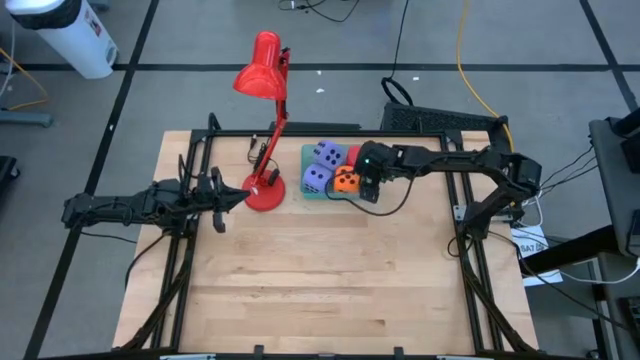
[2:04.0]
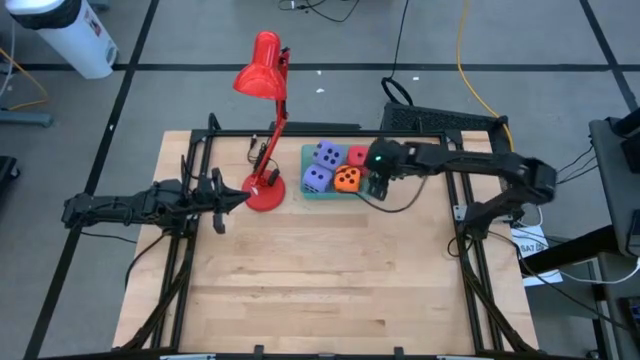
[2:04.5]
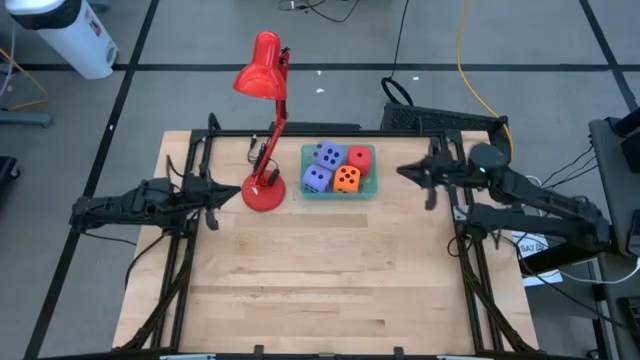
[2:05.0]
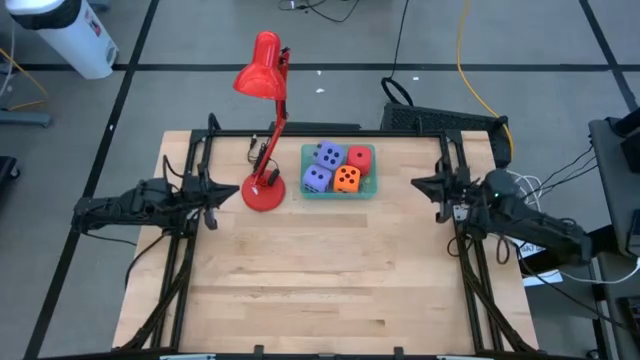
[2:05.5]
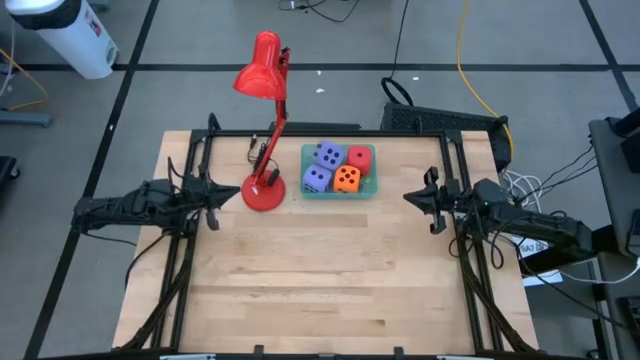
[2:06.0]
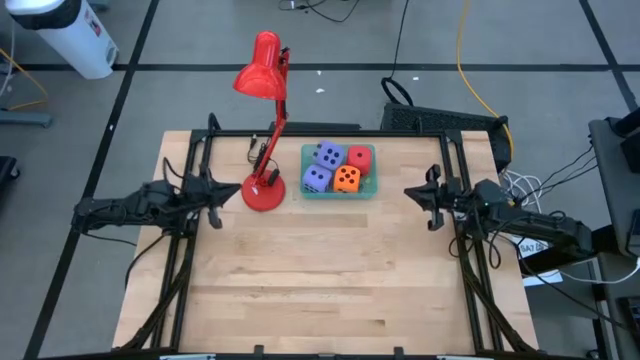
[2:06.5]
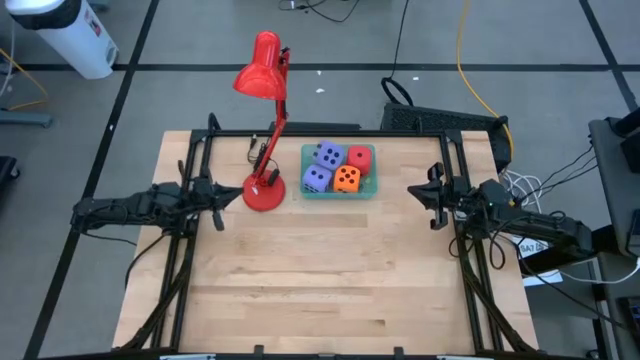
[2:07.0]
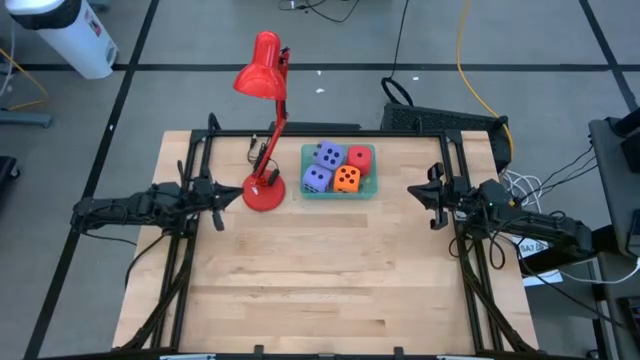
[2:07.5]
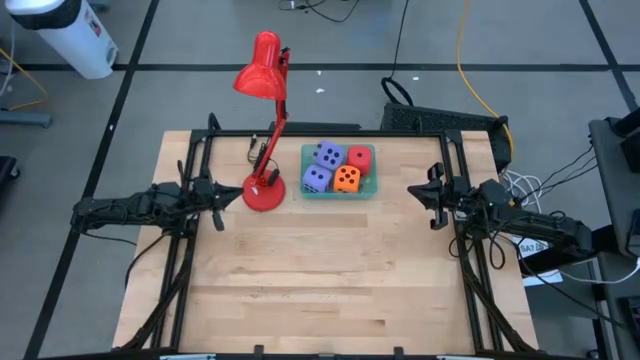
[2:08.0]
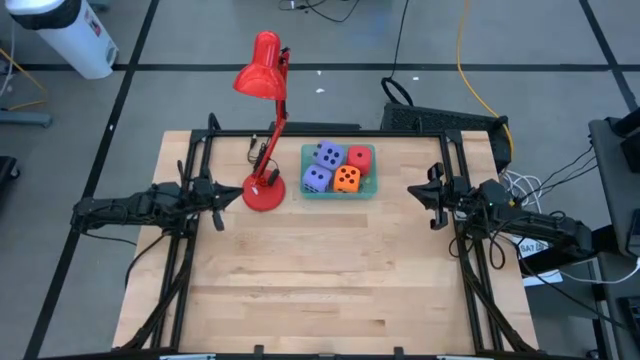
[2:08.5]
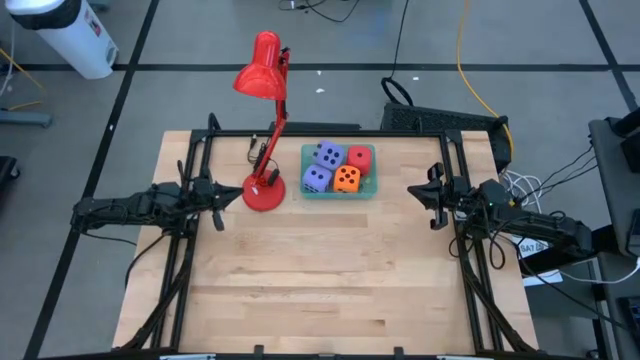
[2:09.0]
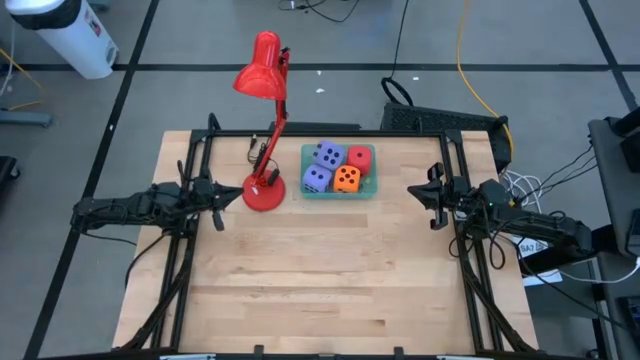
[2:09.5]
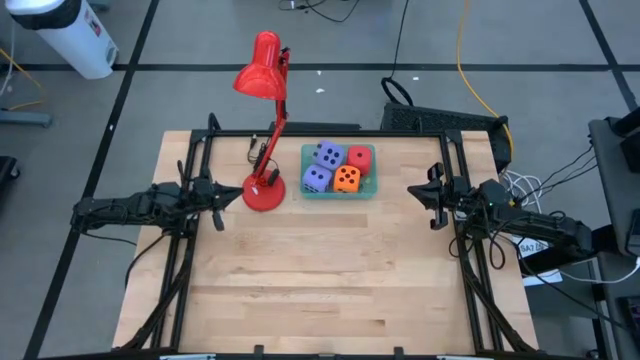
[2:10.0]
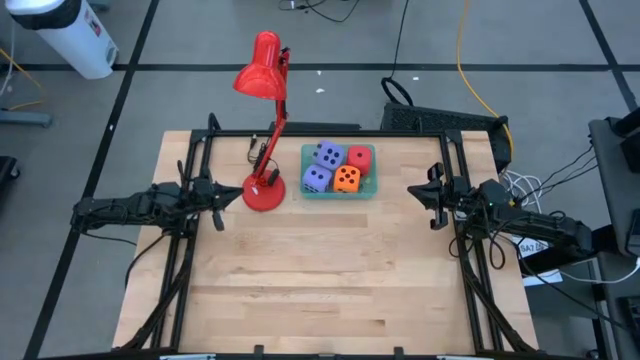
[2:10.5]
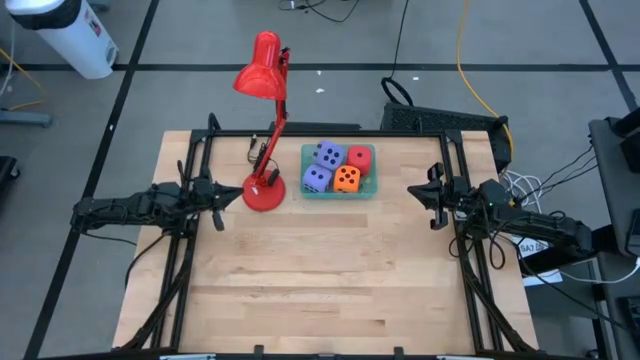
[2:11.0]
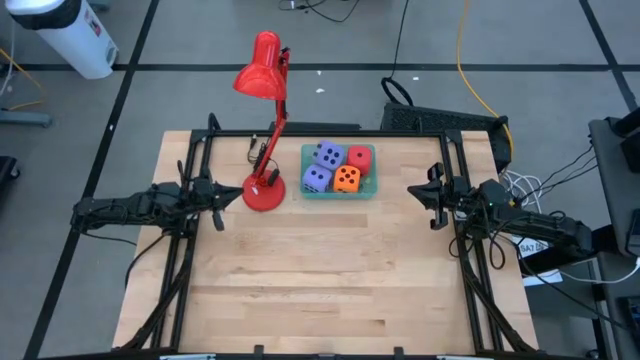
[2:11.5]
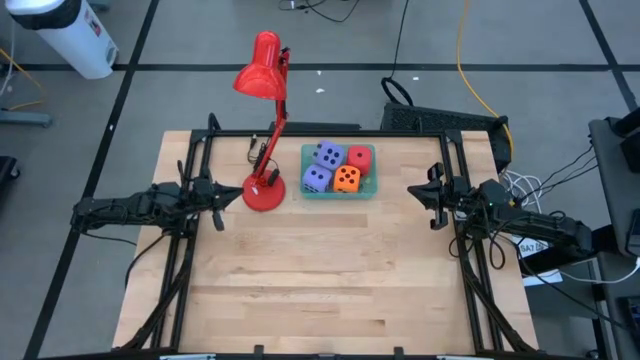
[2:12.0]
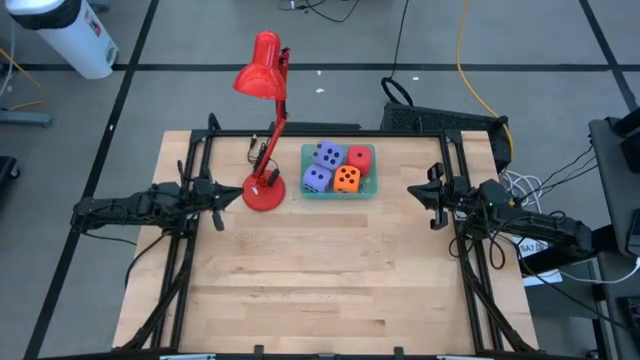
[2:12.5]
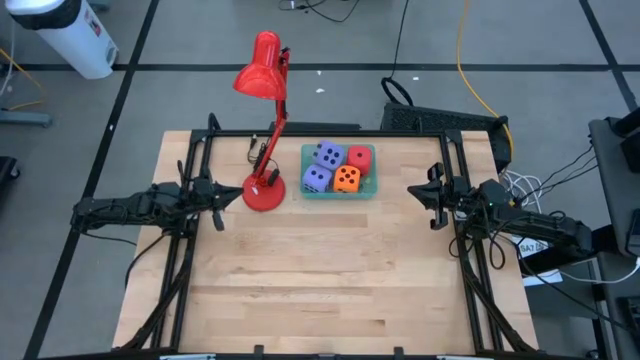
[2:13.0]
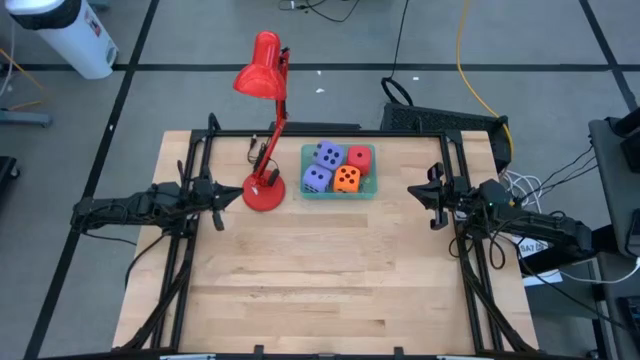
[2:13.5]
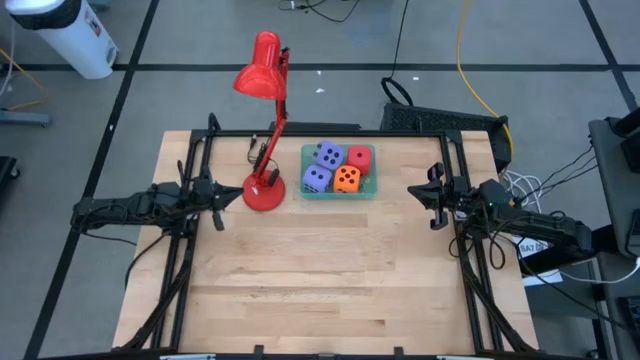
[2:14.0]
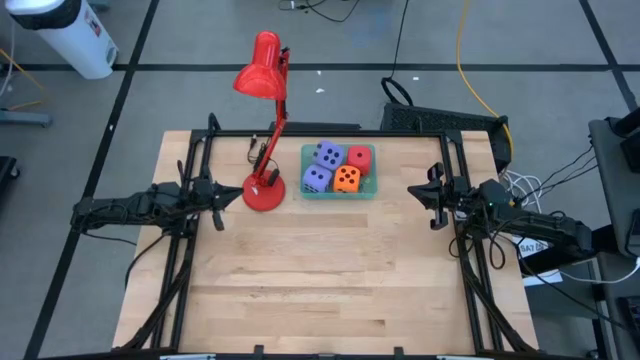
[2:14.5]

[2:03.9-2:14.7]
Task: Pick & Place Dice
Return to Home Position

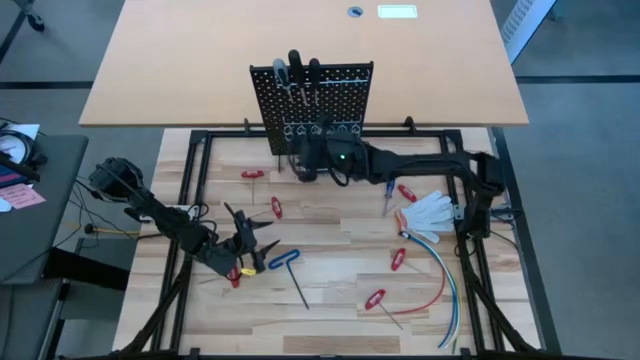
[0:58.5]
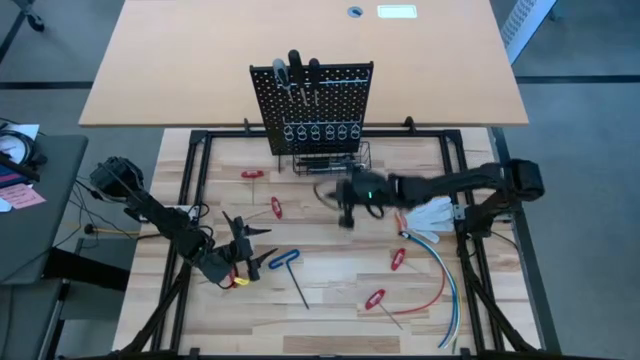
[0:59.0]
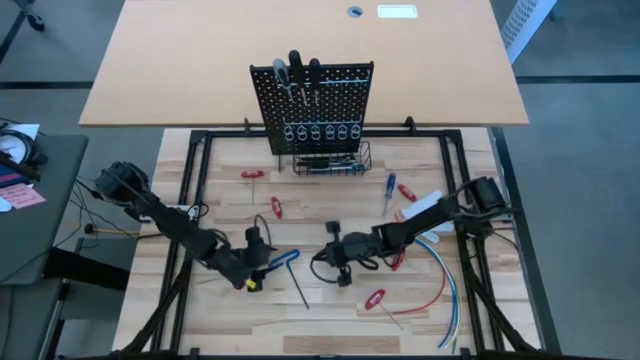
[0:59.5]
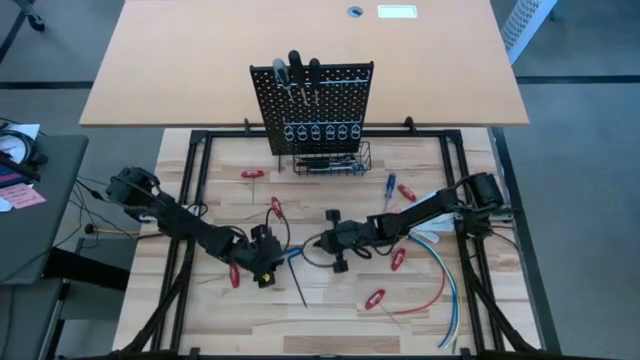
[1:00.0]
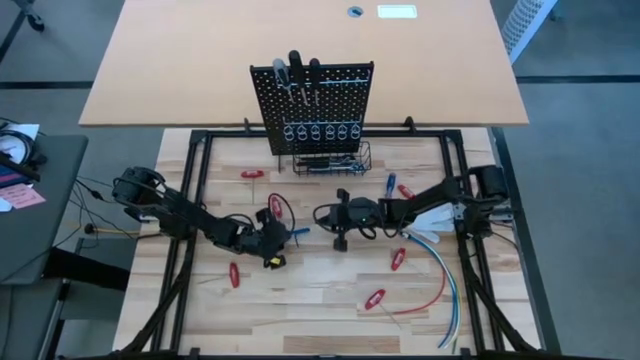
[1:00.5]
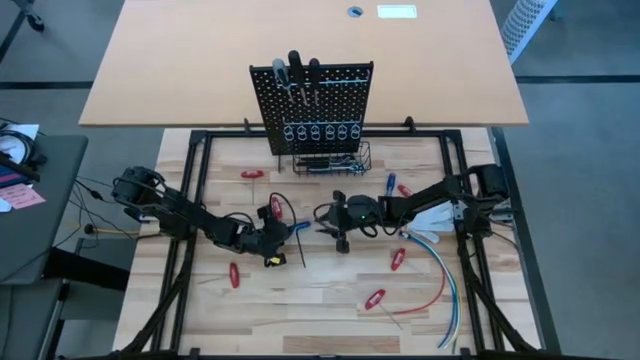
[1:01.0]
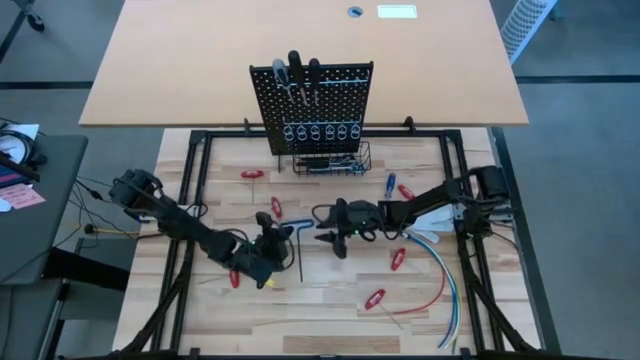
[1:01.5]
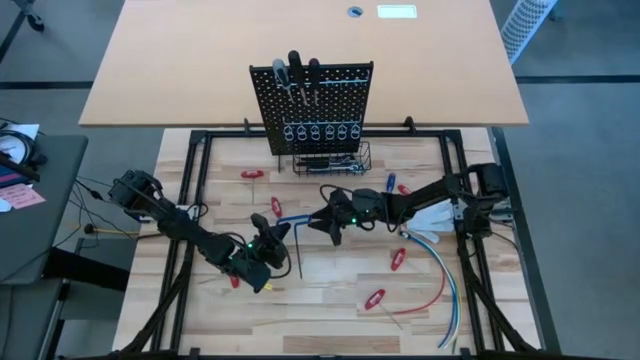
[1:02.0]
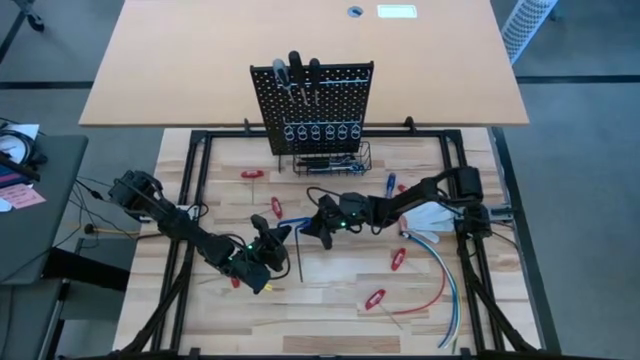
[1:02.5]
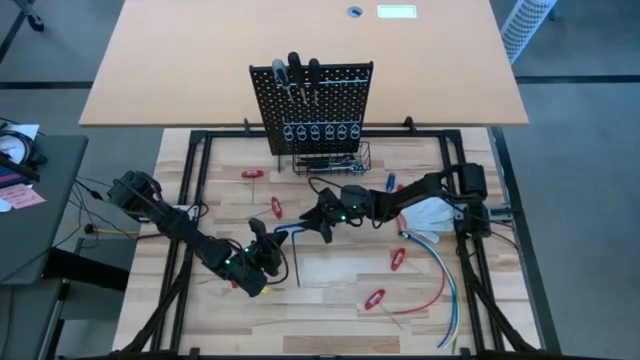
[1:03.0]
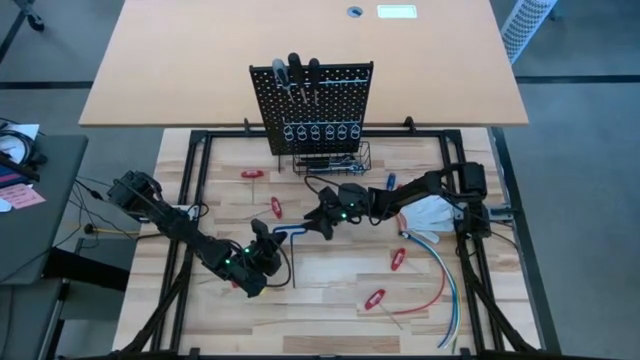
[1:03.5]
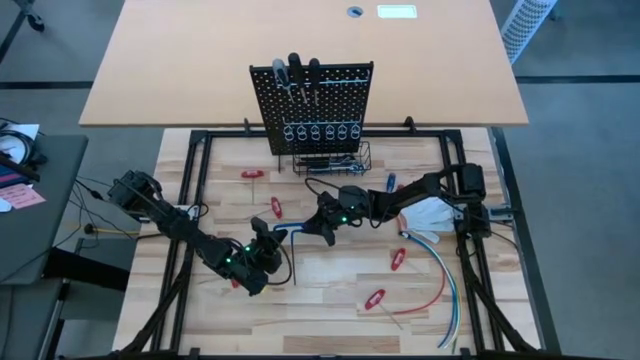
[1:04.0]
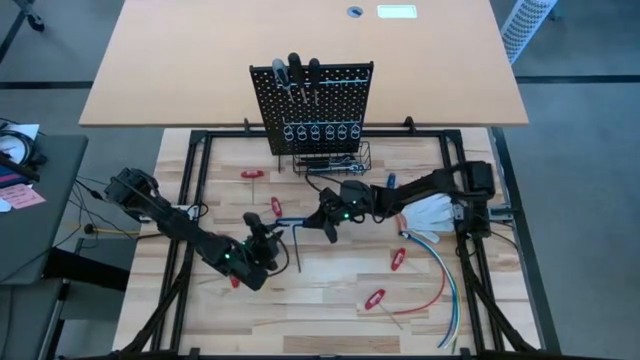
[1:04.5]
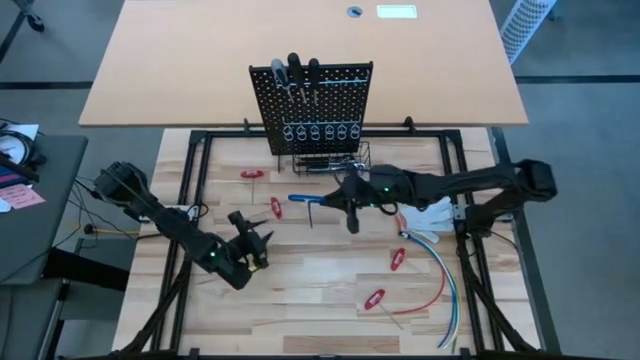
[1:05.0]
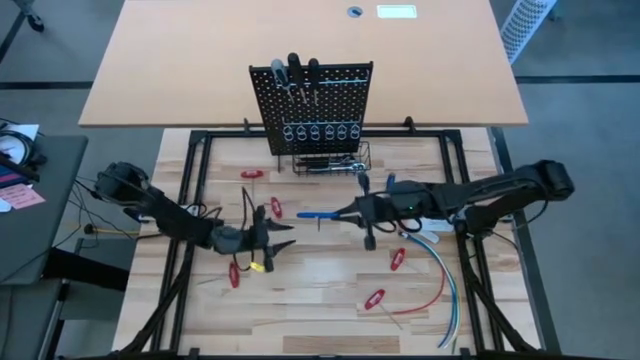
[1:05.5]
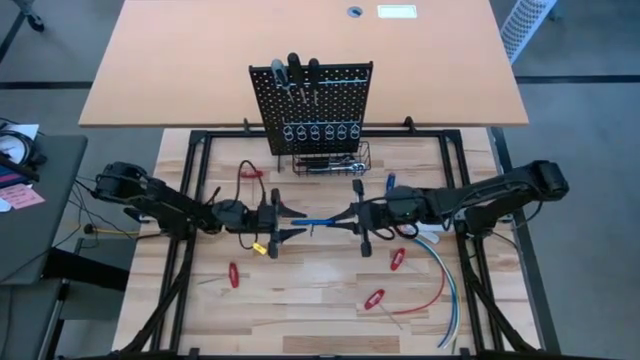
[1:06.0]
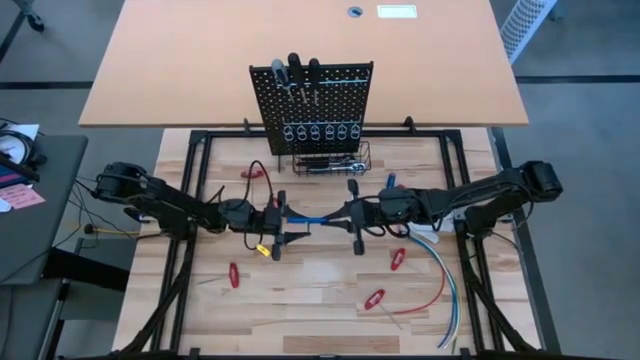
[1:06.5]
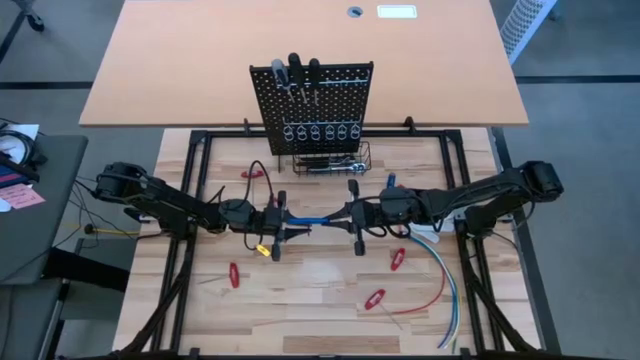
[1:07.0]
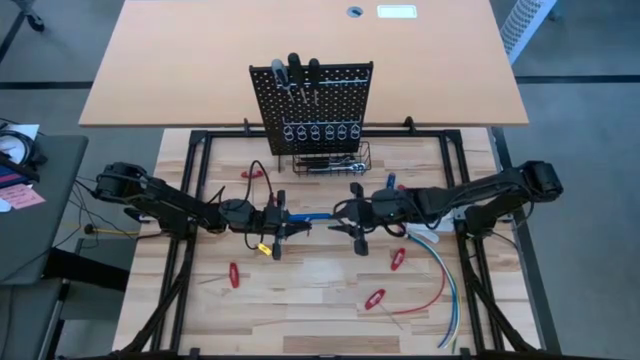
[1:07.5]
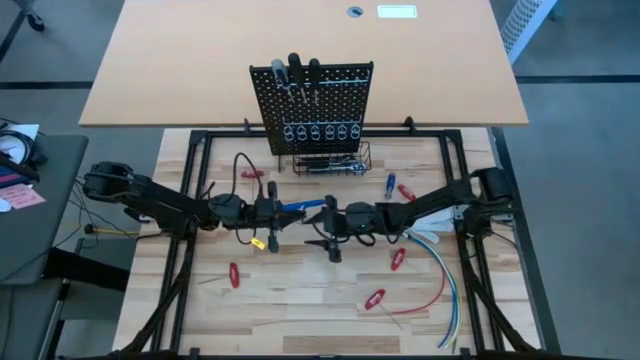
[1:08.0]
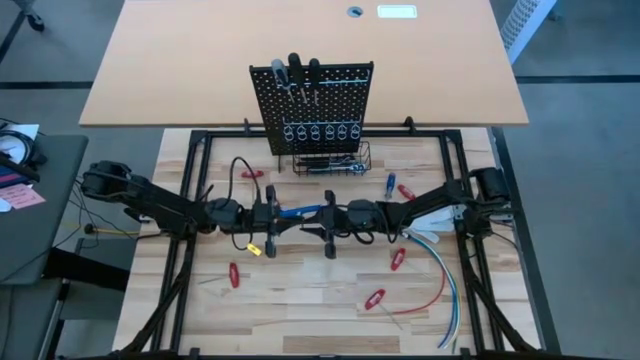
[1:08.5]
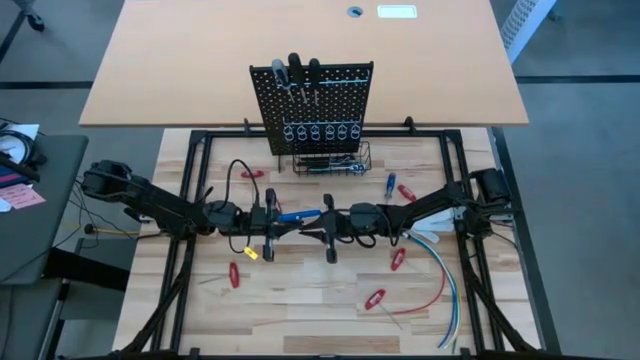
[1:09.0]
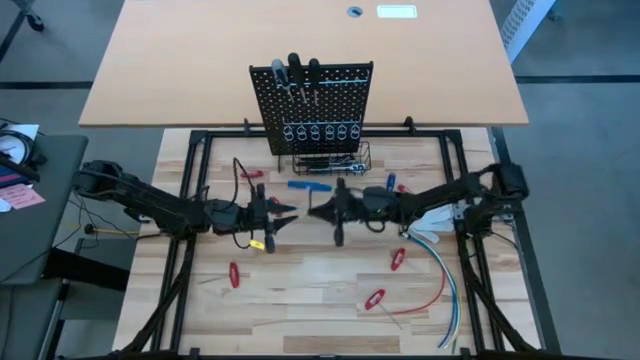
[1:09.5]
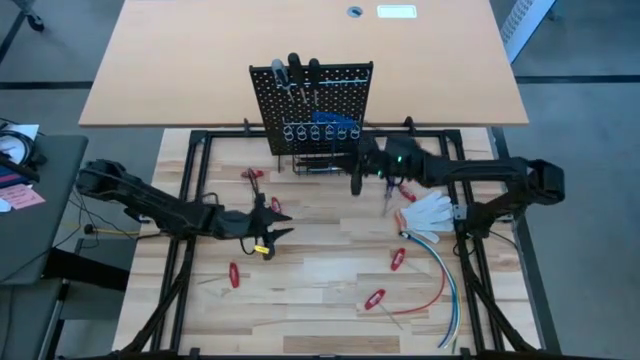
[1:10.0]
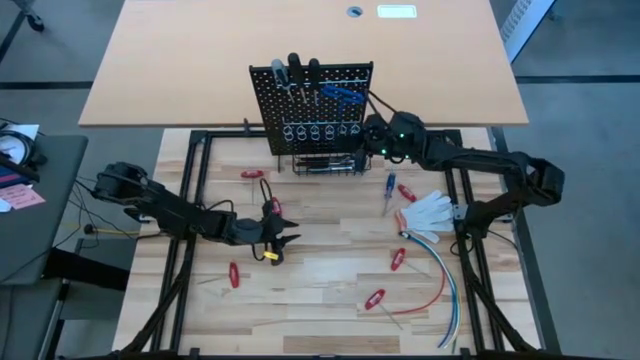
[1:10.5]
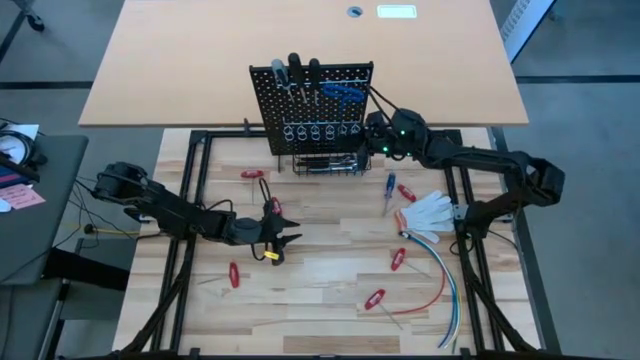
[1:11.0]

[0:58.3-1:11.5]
Task: Hang tools onto peg board
Hang the blue pick tool on the pegboard
